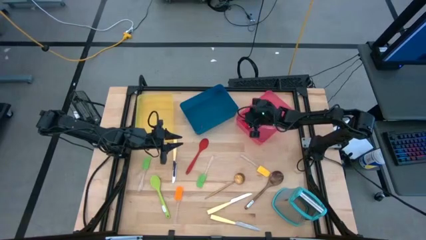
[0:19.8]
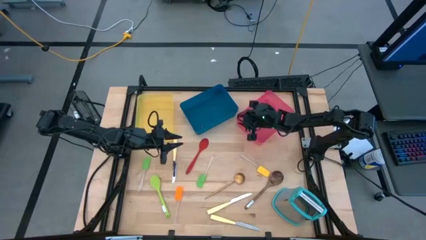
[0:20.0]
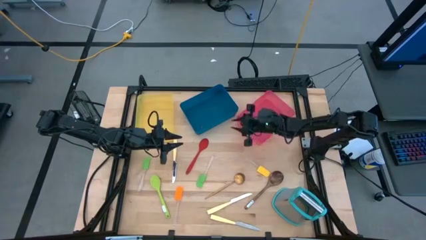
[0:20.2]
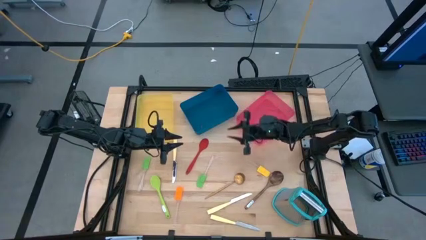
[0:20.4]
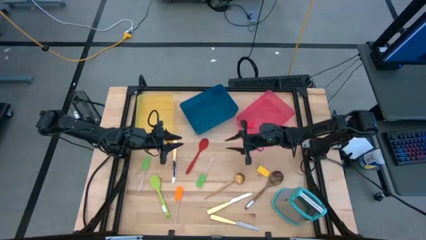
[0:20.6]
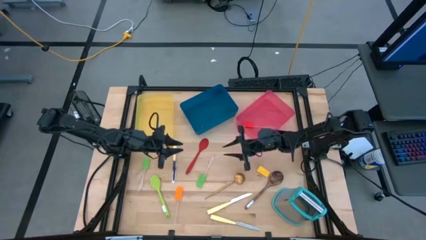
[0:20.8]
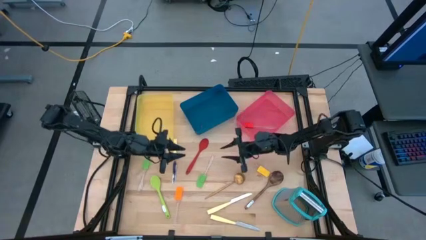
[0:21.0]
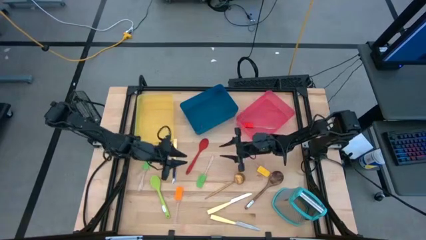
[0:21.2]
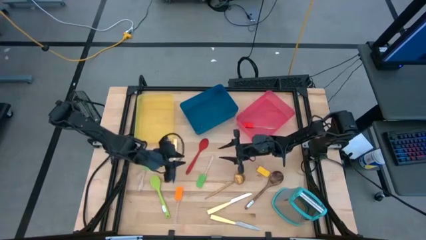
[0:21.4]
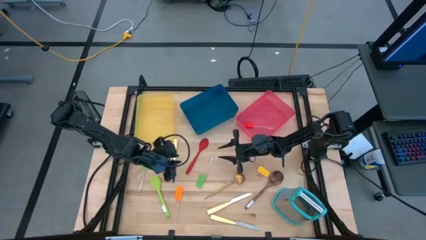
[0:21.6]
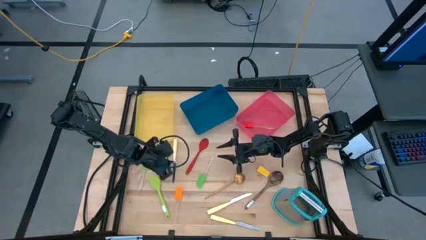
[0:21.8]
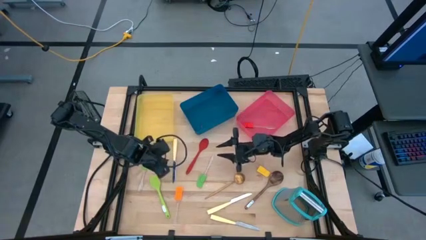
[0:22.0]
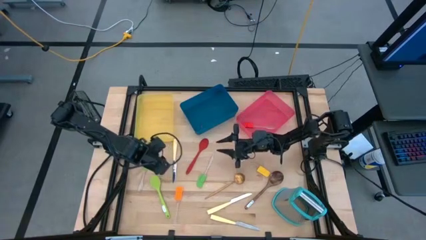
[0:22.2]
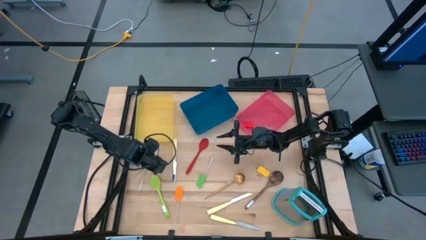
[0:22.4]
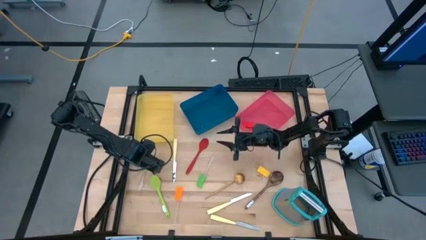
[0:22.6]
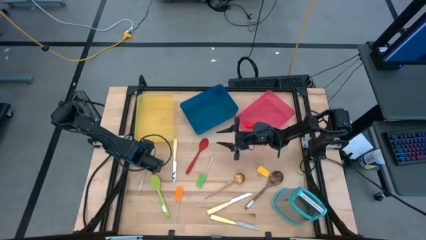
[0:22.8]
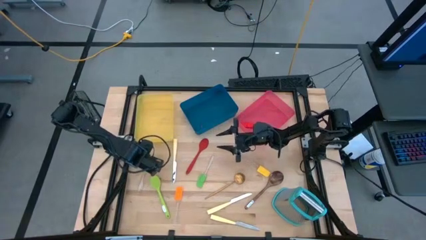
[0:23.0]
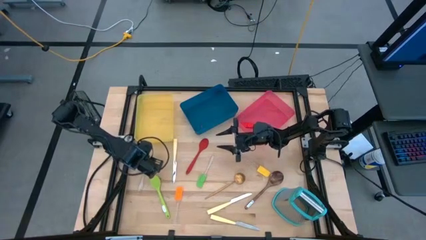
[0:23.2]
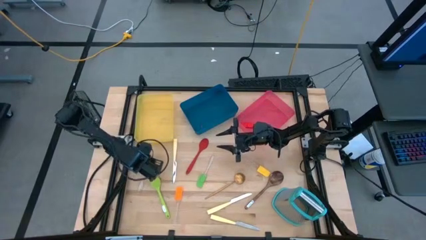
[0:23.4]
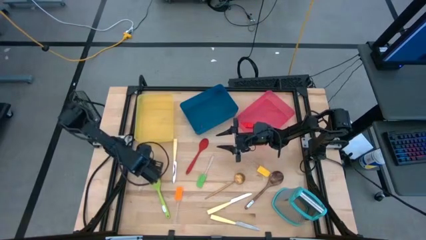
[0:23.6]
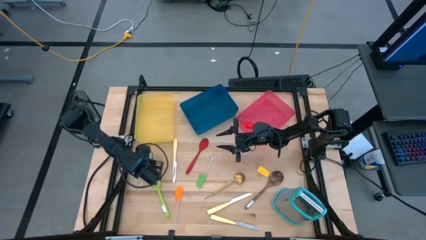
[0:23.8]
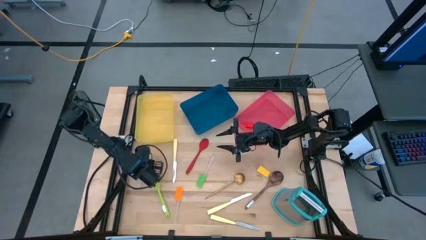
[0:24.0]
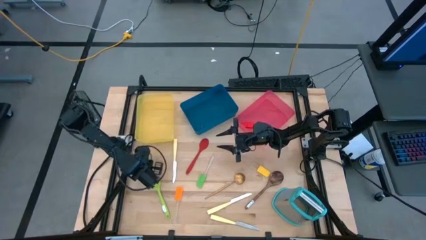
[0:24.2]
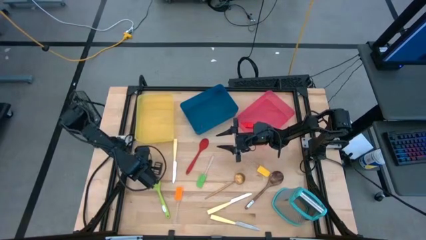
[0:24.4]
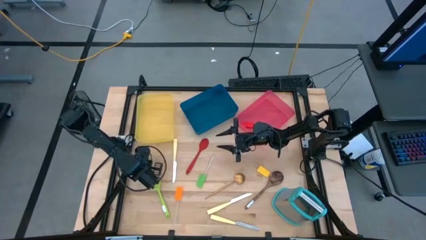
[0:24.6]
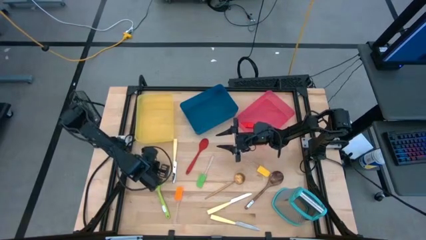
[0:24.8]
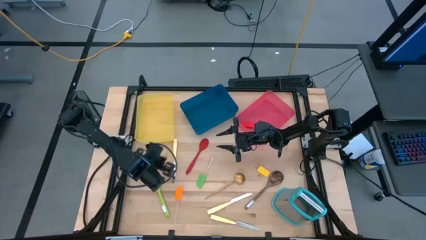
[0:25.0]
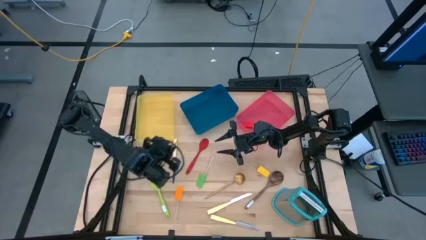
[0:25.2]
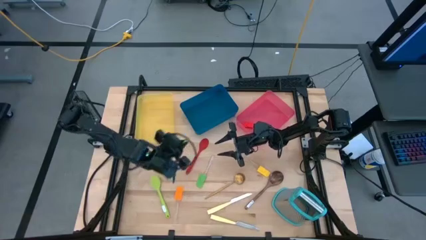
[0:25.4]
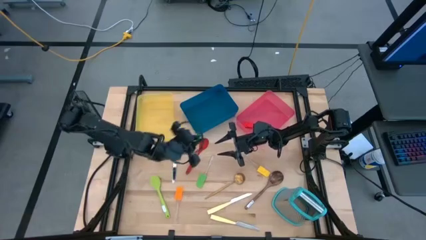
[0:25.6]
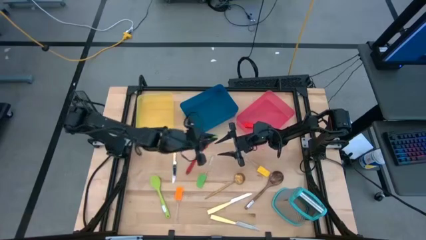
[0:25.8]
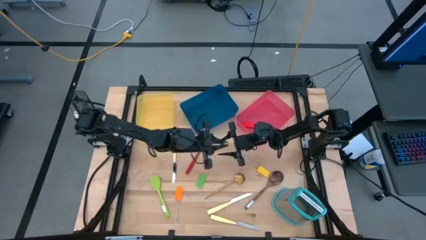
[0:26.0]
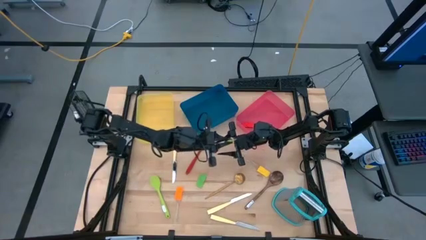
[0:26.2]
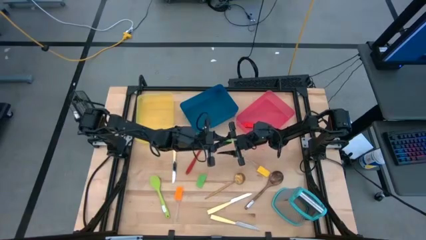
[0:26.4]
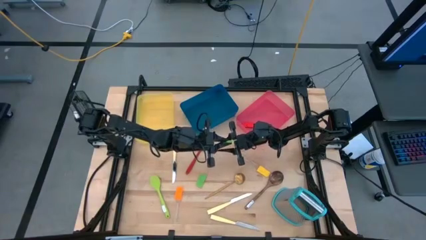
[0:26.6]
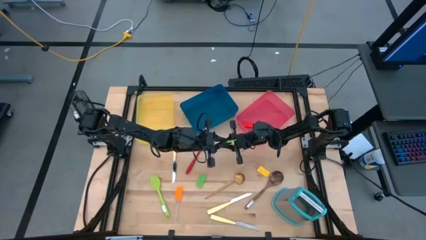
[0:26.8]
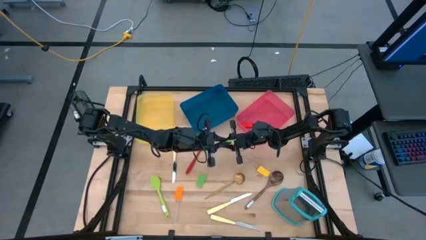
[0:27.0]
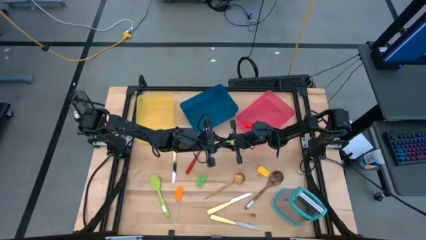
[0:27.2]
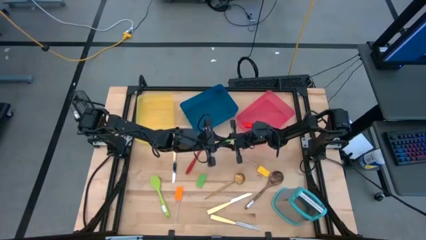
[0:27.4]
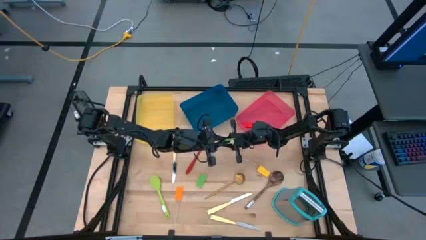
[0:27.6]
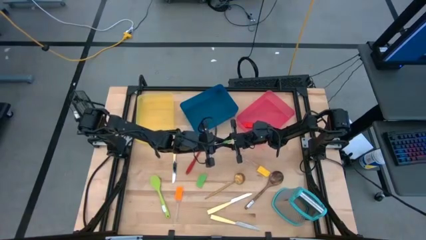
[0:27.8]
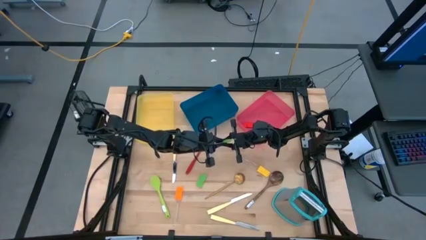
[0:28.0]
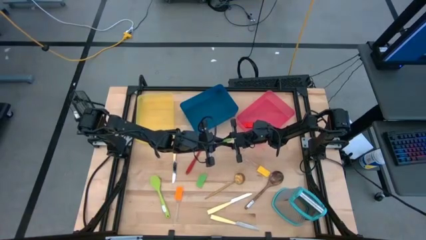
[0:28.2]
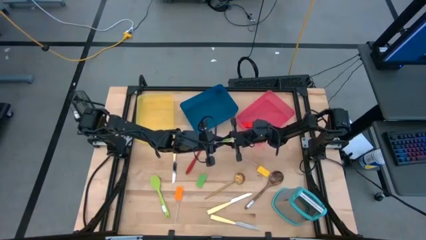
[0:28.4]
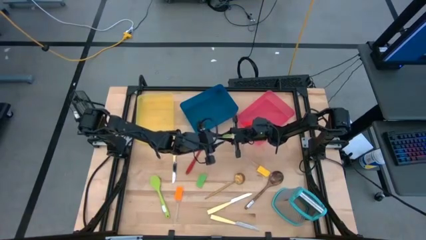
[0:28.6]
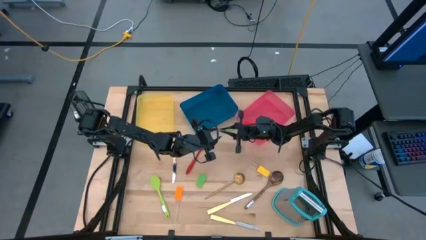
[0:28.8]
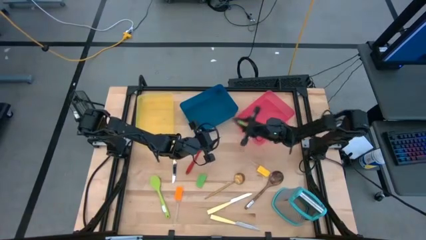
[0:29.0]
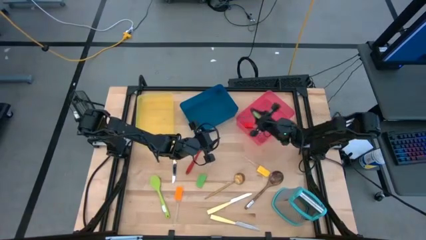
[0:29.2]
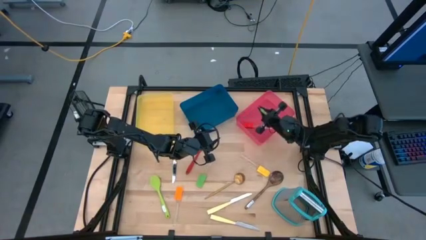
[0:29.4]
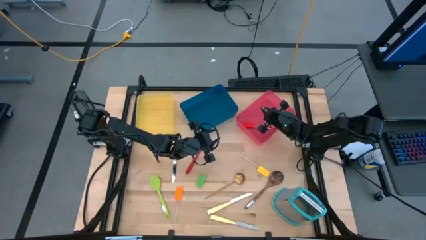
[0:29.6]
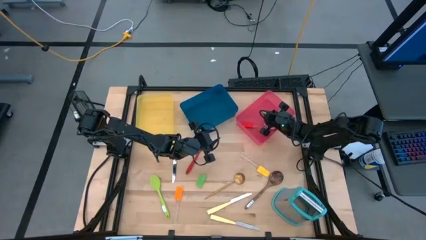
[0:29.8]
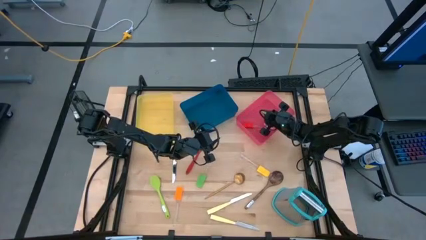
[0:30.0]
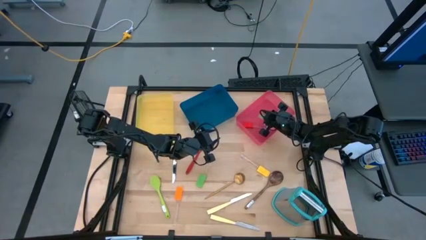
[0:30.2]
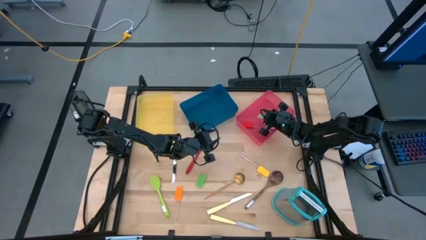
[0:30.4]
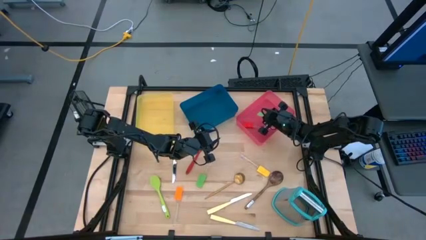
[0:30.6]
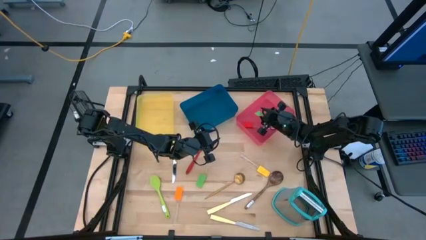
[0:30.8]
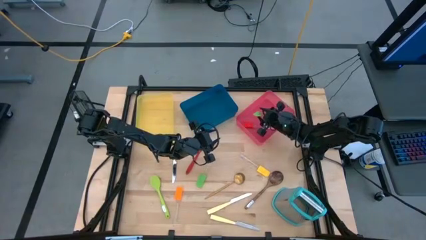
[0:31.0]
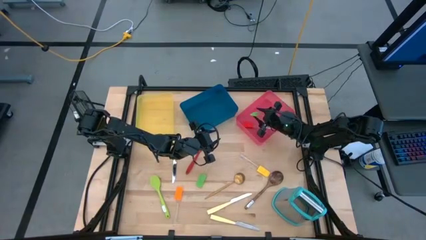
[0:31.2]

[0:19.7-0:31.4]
Task: Pick & Place Kitchen Items
Put the green spatula into the red bin

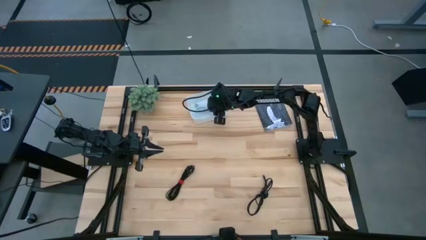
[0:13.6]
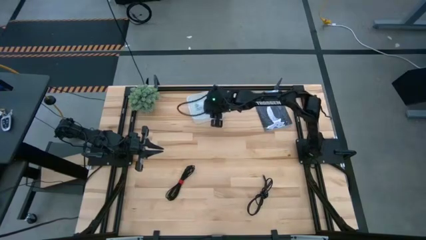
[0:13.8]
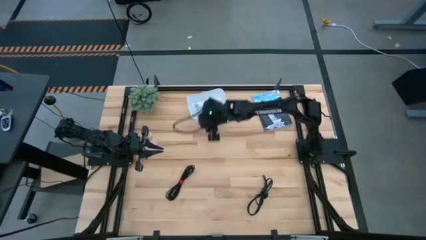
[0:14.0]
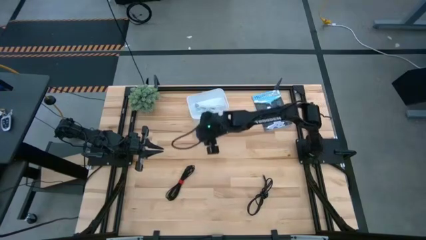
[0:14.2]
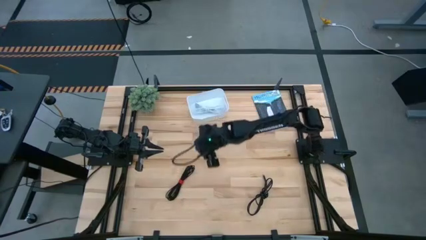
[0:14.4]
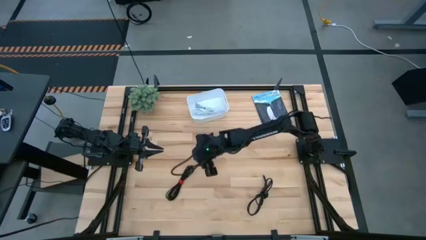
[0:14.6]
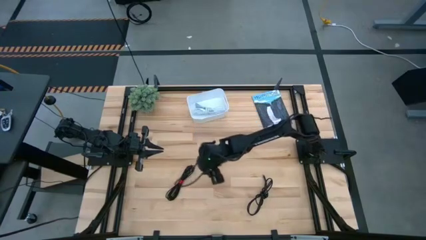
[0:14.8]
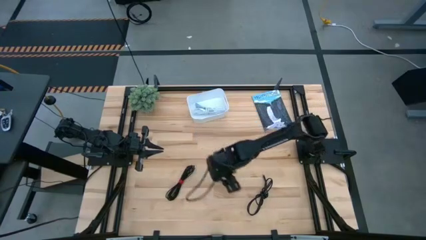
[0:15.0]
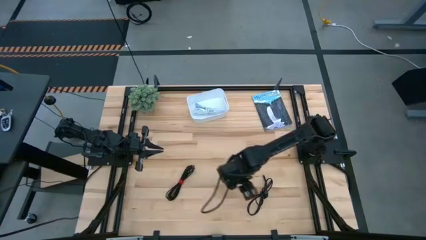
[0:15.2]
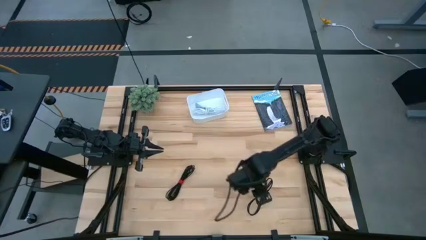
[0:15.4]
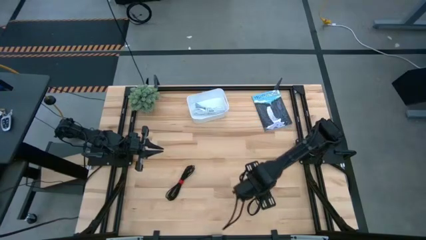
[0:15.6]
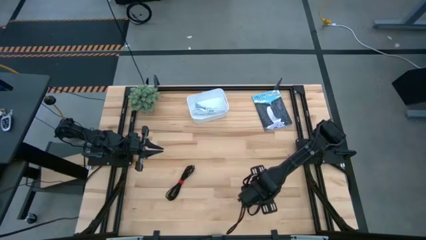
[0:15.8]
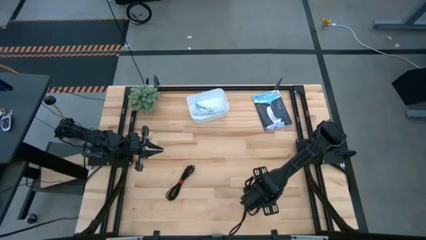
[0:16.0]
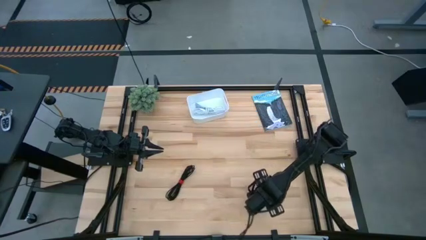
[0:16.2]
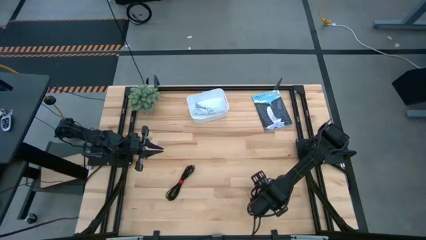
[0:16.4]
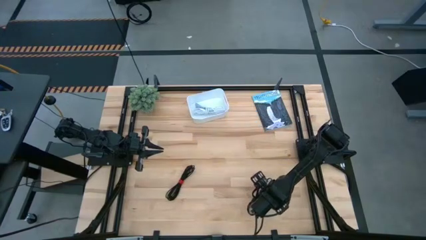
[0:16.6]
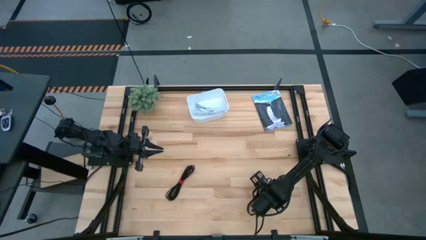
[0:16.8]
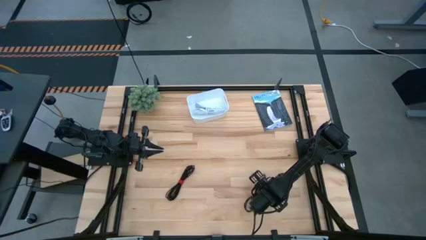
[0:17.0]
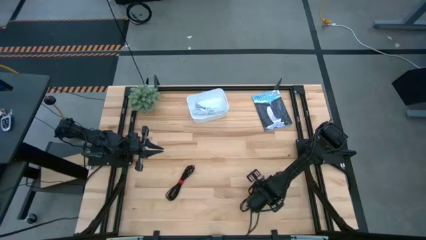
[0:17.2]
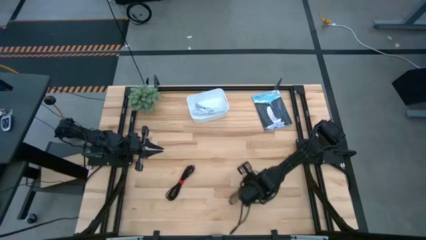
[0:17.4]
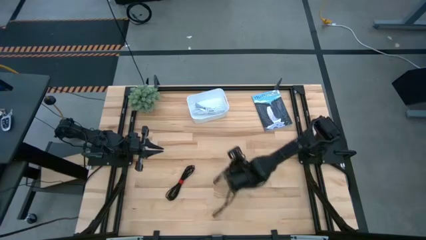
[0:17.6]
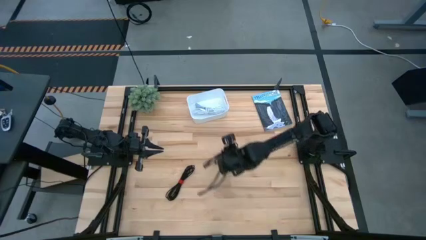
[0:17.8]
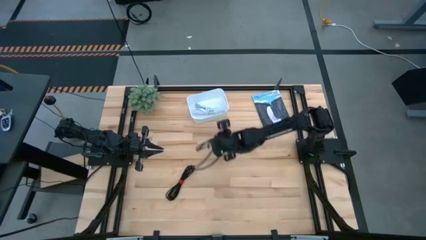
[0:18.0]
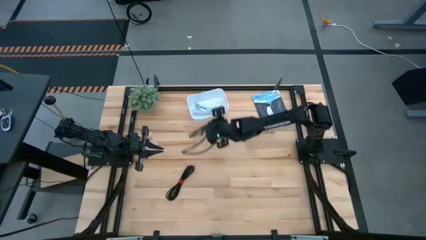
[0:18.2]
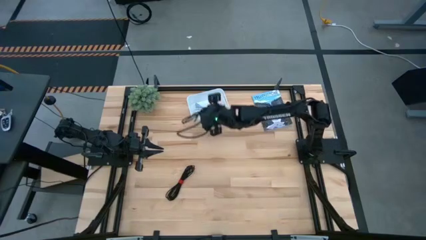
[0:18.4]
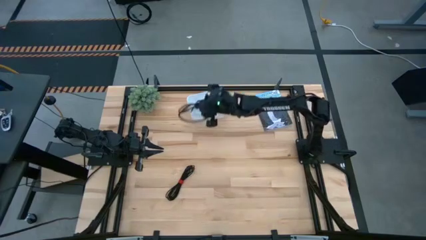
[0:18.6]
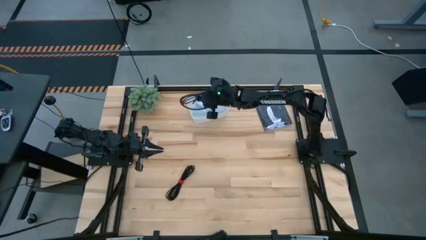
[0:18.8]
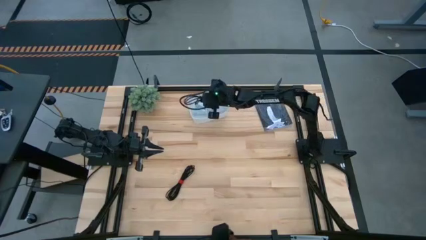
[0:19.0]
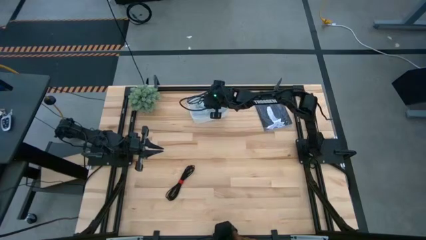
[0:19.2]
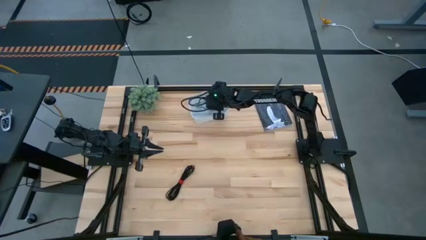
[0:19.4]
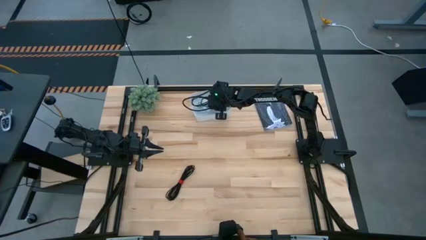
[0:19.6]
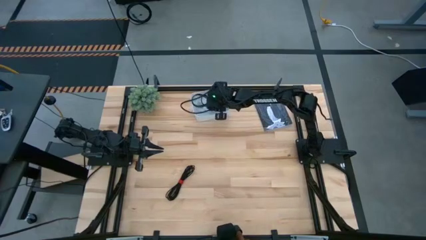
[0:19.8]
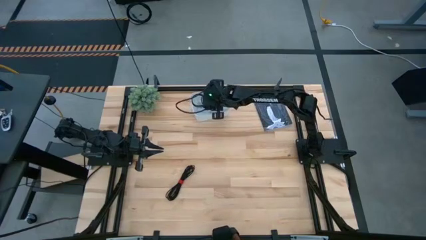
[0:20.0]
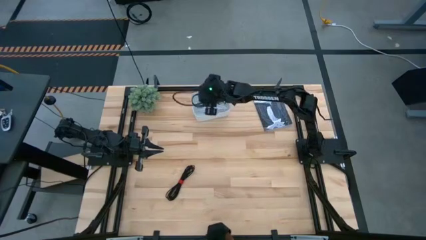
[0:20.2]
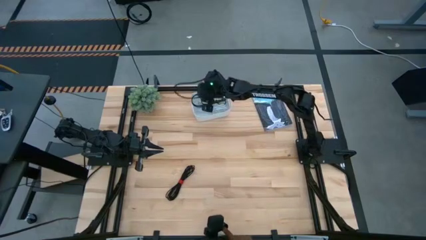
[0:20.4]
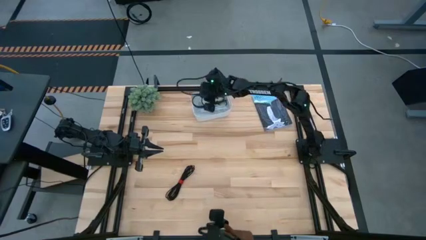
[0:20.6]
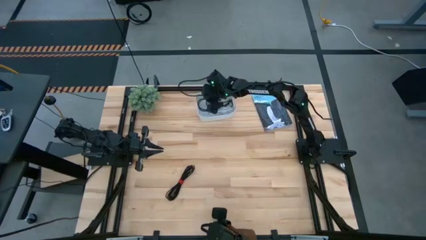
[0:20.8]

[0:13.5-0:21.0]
Task: Pick and place USB-C Cables
Put the right black charger cable into the white bin
